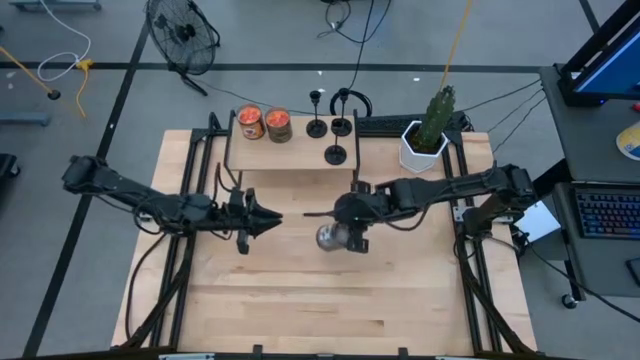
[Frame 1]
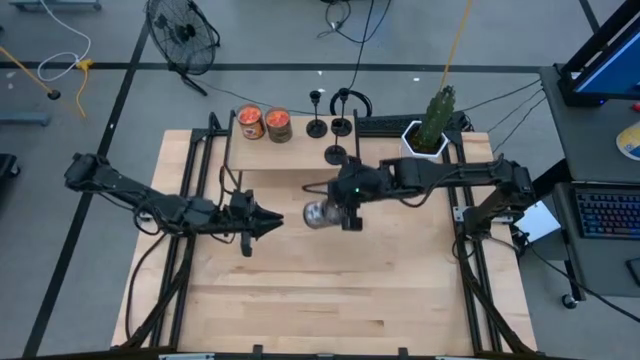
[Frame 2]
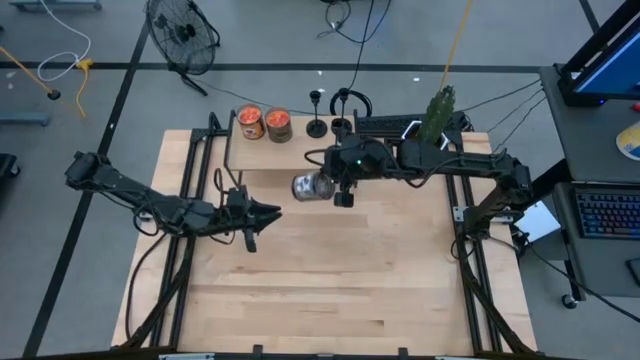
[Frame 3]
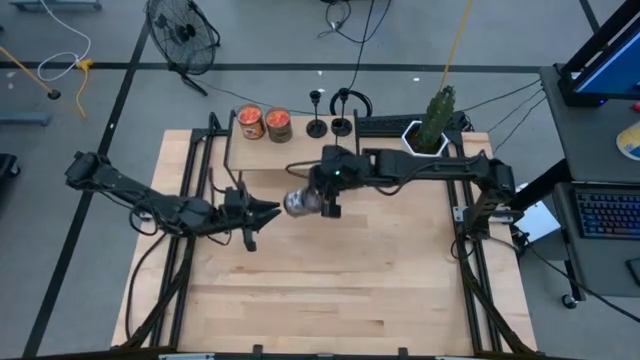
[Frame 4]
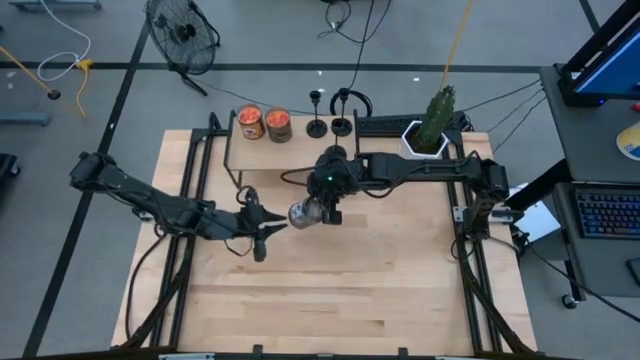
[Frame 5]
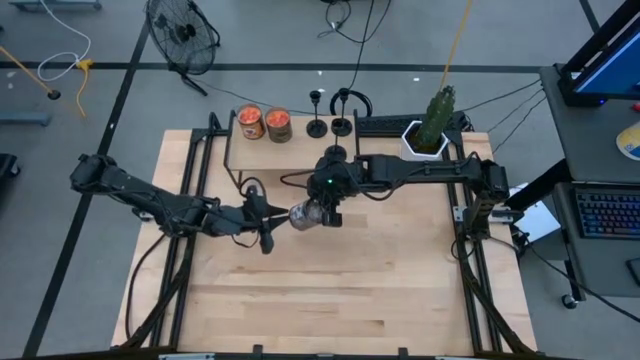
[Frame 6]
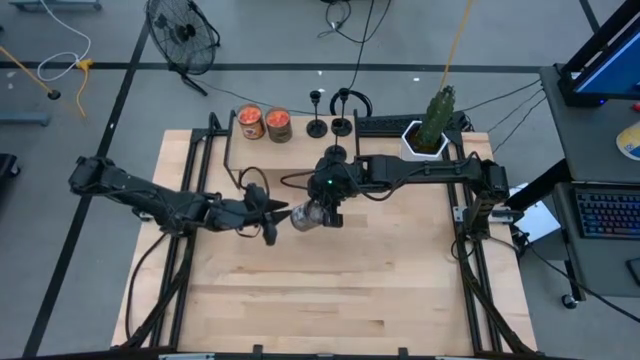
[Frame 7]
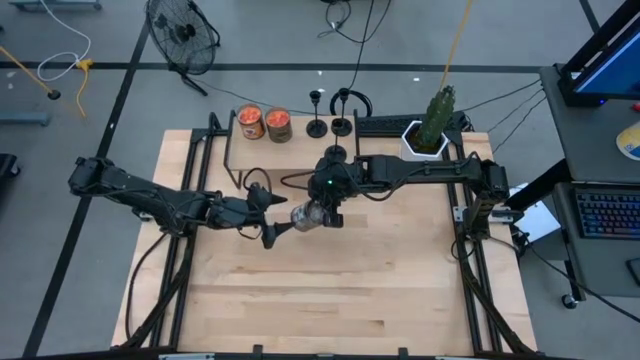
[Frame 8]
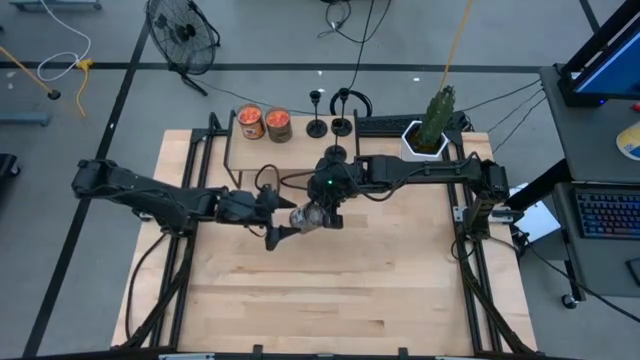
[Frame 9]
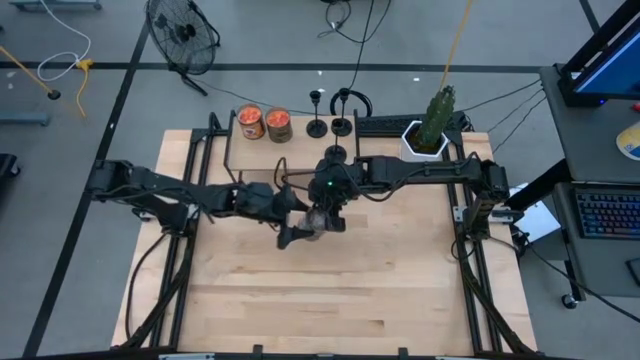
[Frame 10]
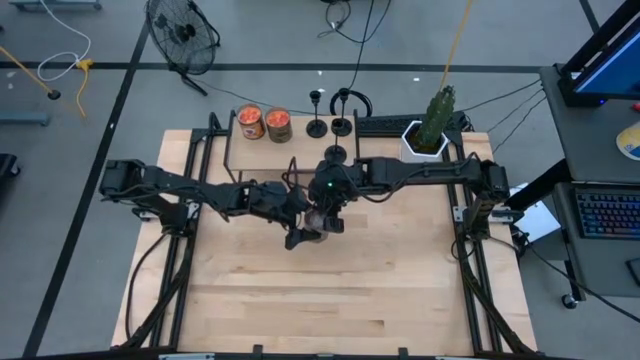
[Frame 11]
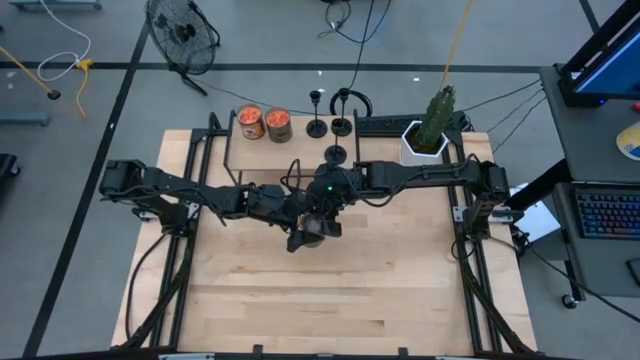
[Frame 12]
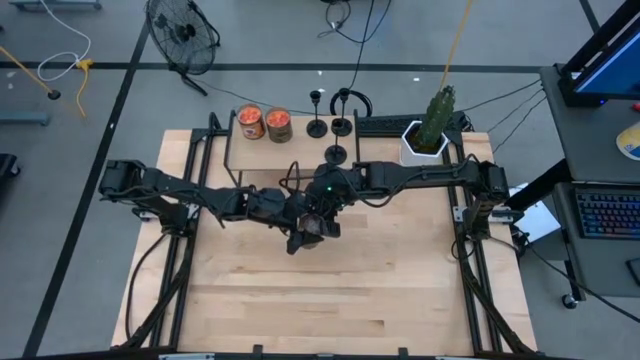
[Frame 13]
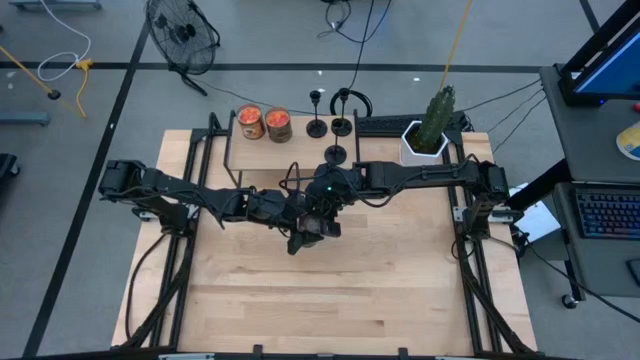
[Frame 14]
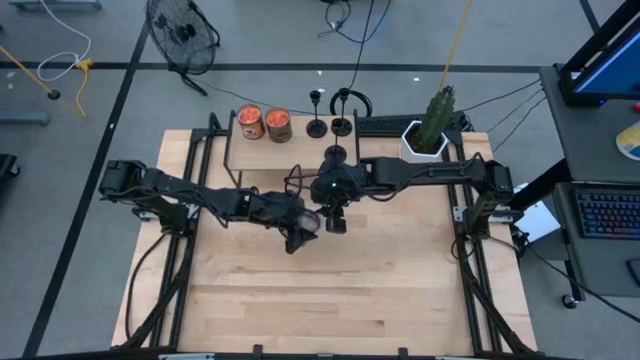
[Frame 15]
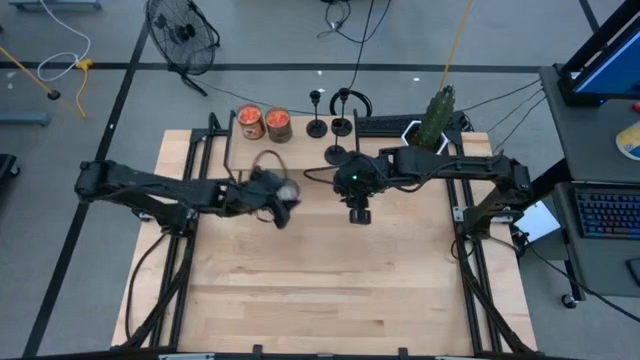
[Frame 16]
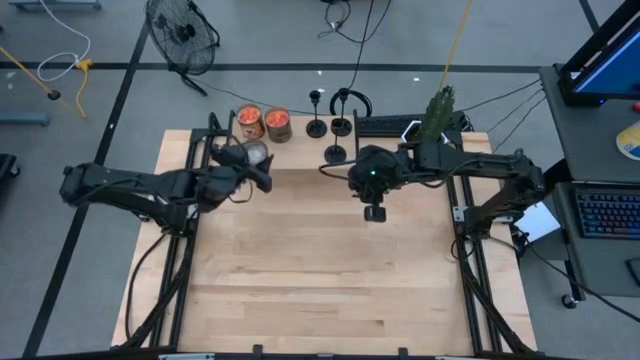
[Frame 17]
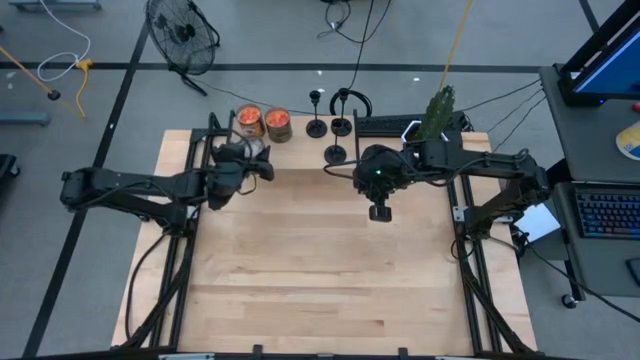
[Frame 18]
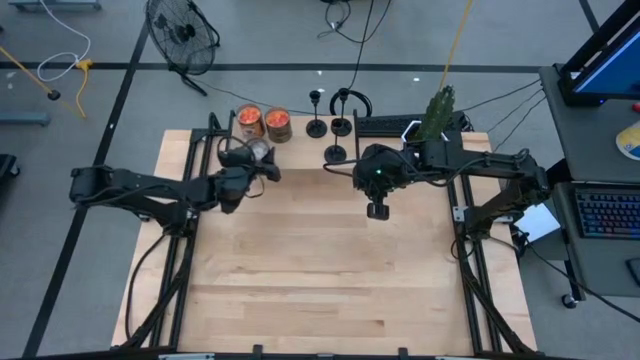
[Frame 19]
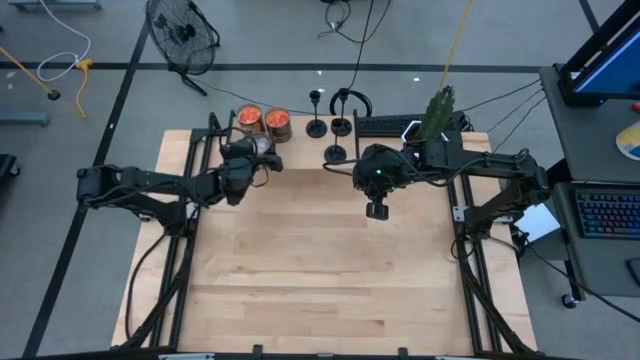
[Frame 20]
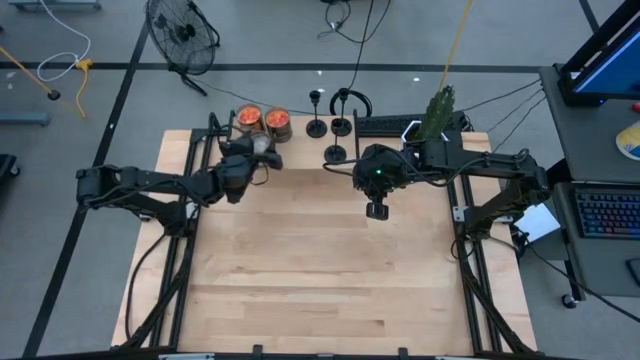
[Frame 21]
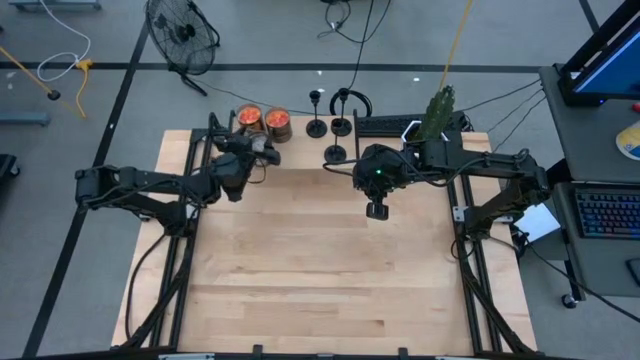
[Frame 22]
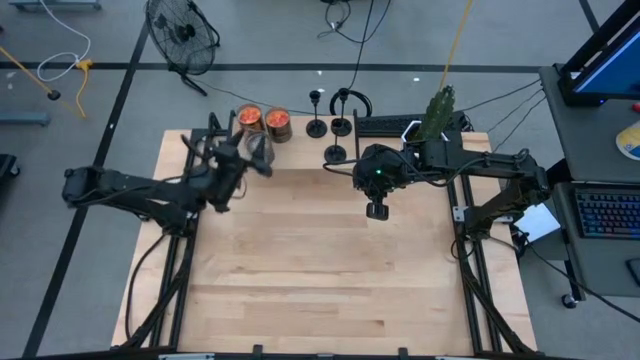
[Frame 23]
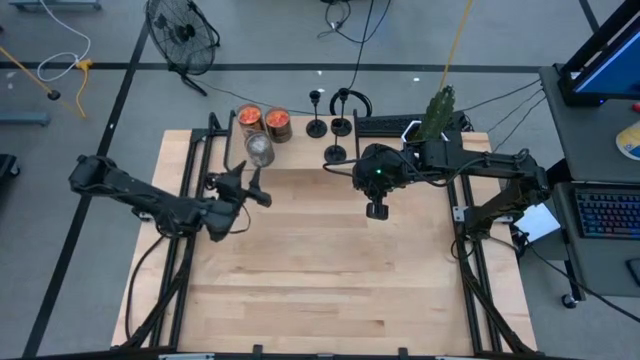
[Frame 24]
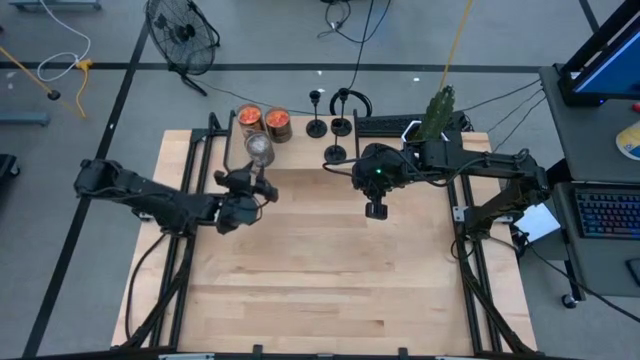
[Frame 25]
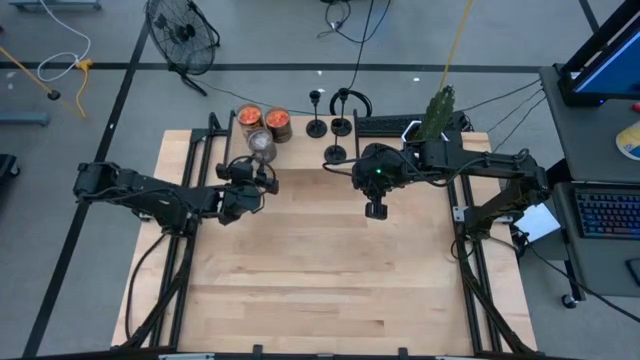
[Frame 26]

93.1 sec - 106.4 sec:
Task: Pick & Place candle stick holders
Put the brown scented candle can on the shelf

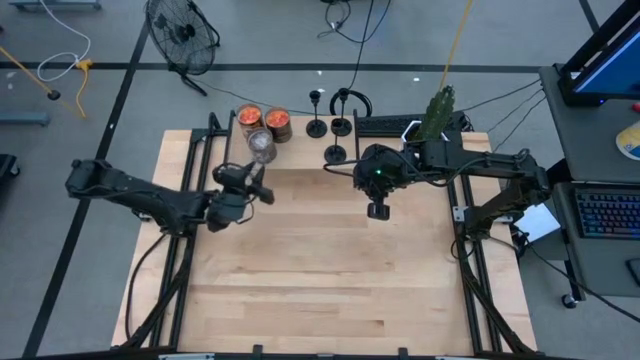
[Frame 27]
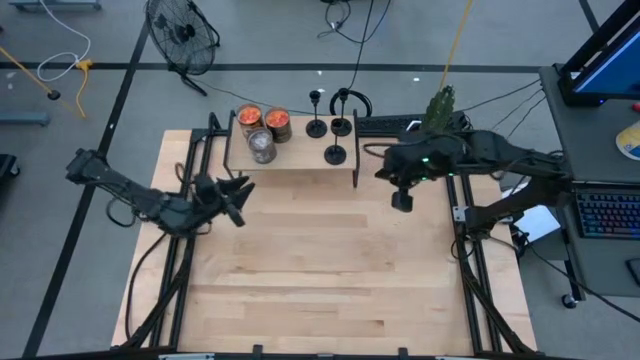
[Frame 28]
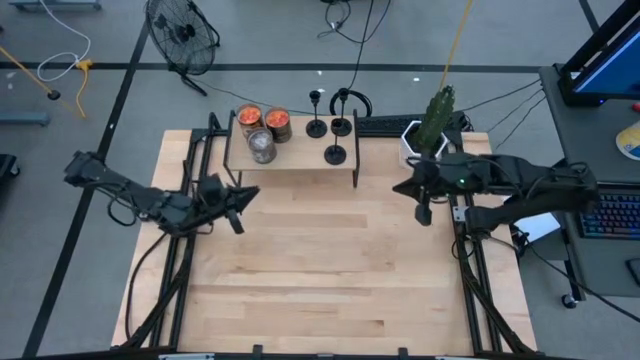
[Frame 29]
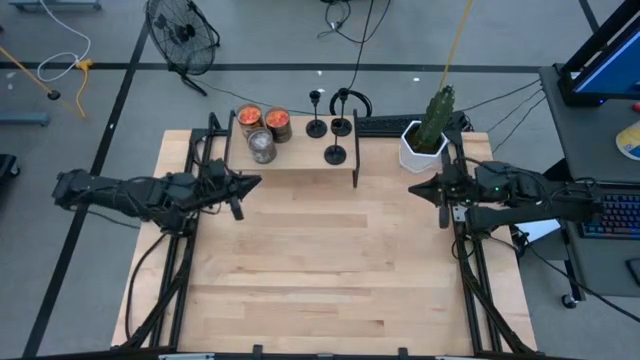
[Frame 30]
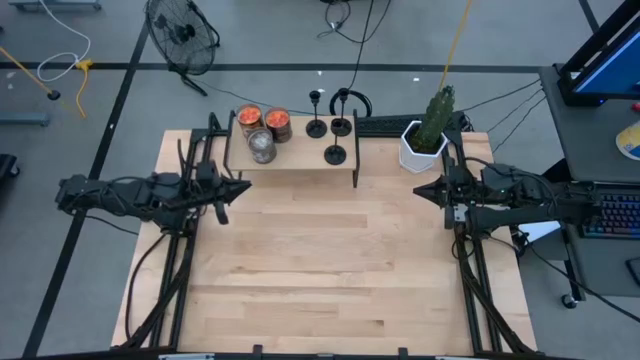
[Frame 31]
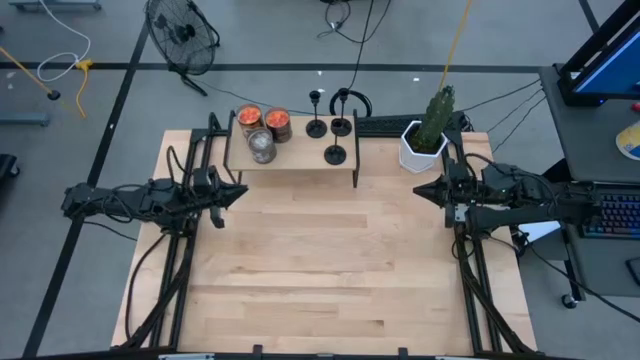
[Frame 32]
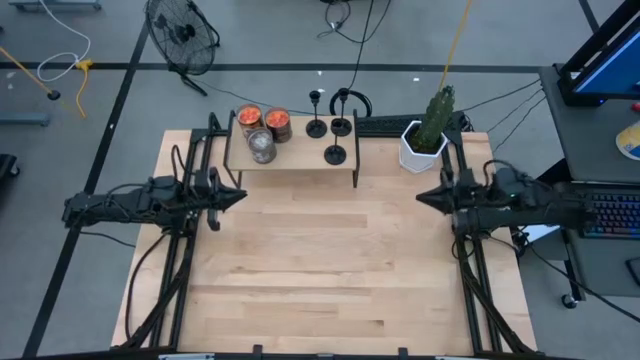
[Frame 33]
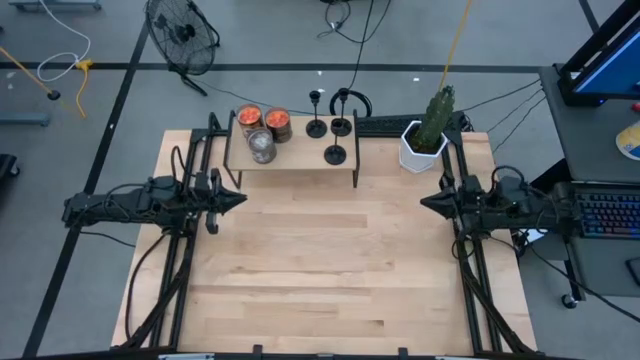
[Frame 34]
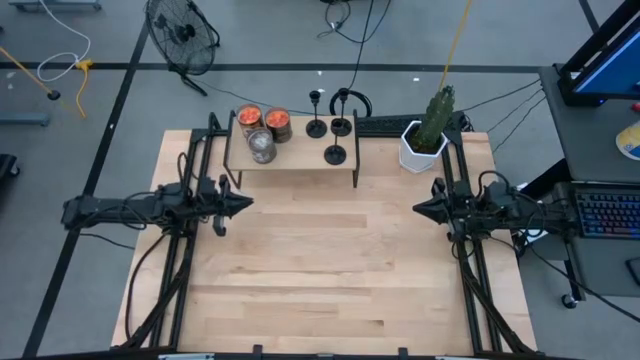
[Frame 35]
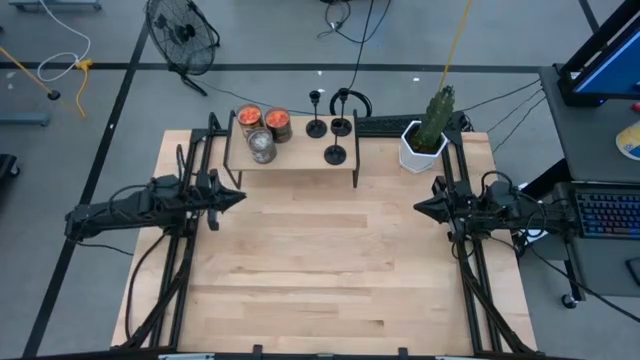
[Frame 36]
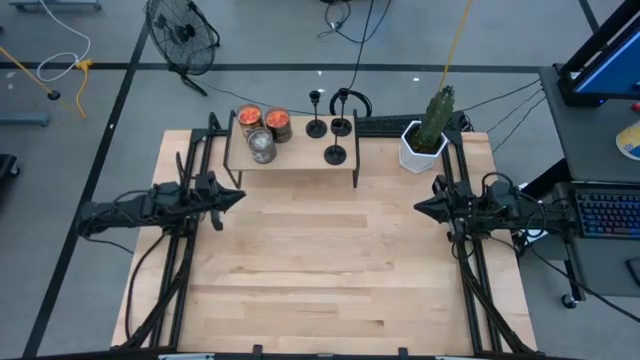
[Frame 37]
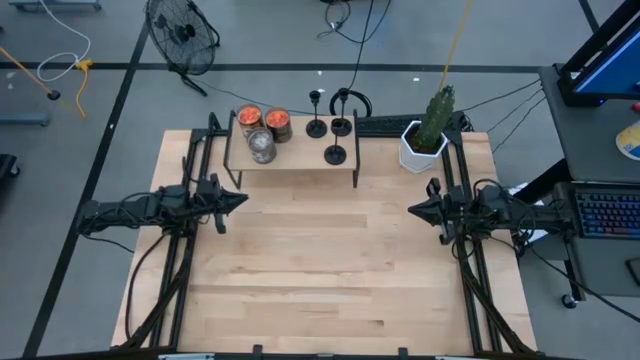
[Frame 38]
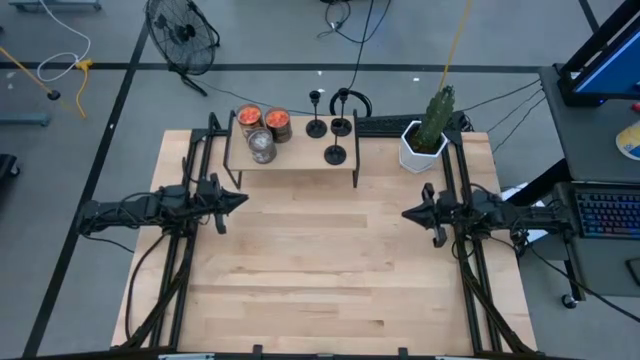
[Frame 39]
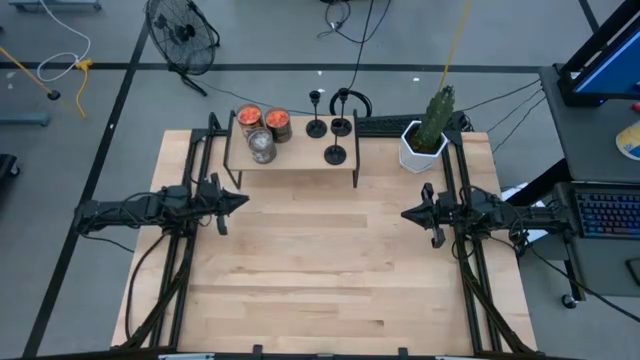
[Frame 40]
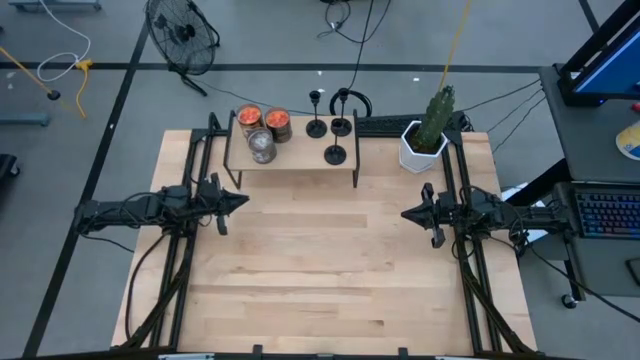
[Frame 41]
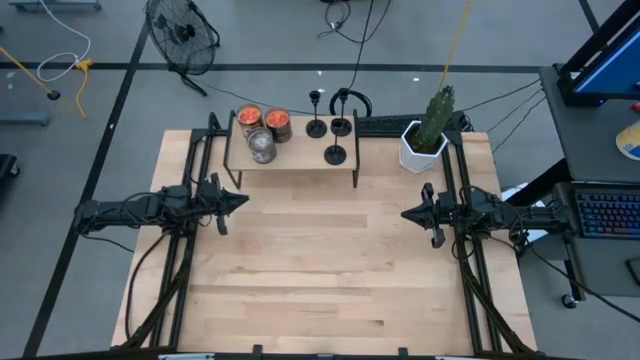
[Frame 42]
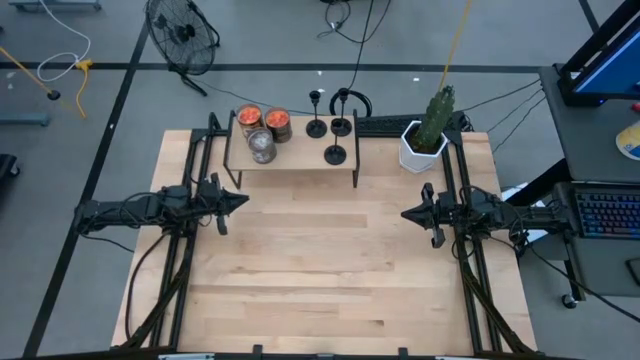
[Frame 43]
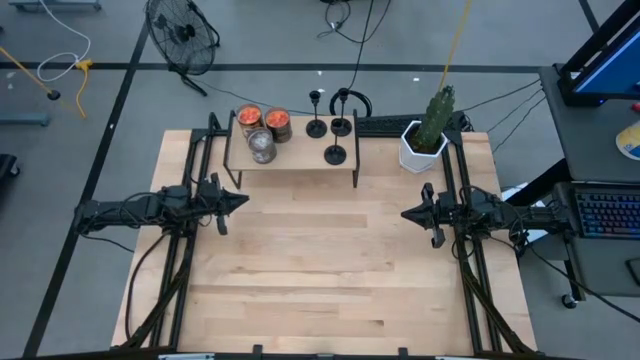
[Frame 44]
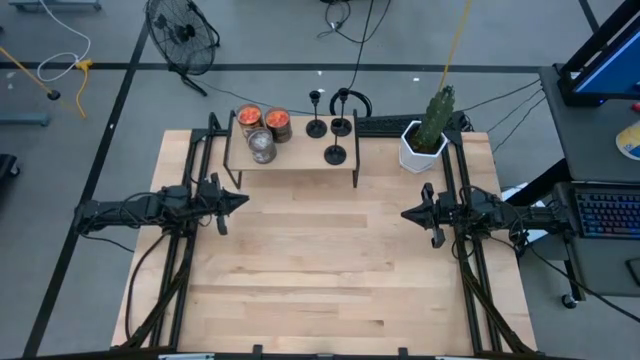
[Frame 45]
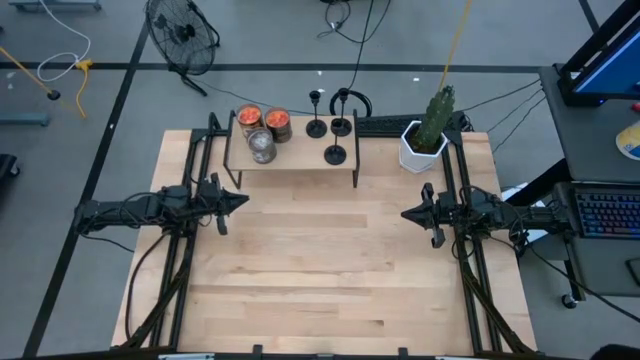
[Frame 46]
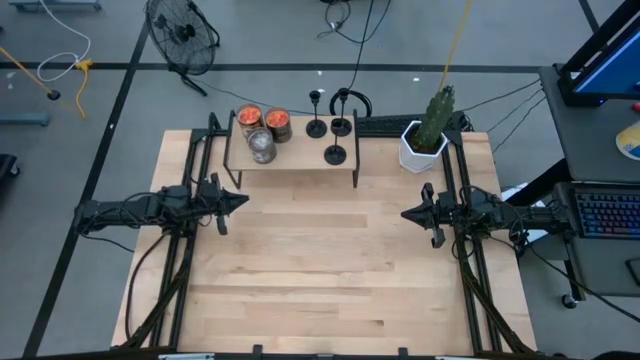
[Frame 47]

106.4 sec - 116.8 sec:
Return to Home Position
